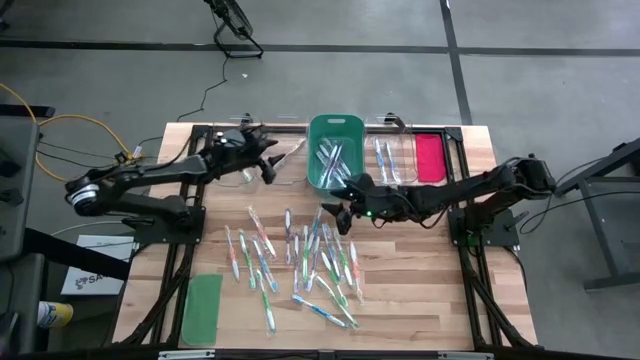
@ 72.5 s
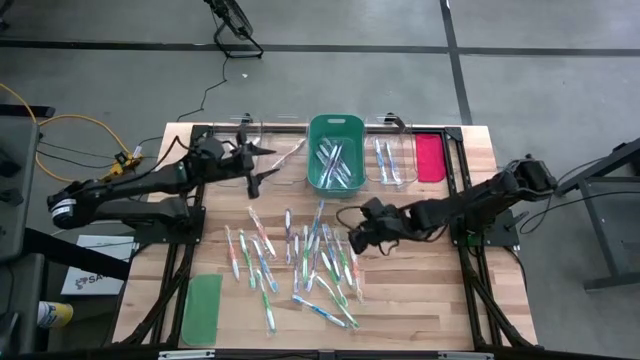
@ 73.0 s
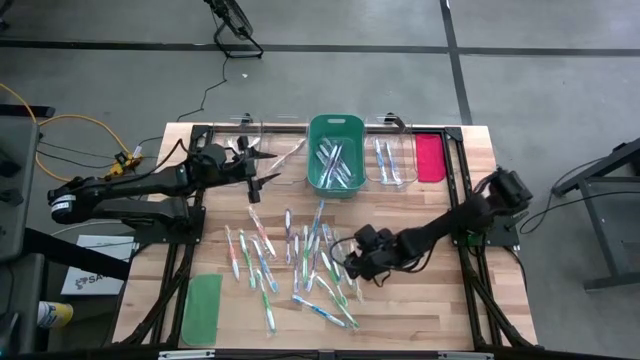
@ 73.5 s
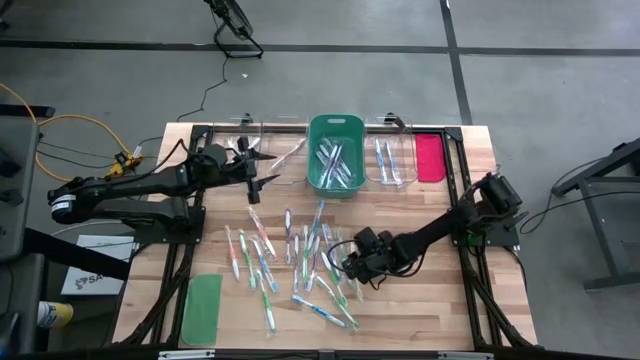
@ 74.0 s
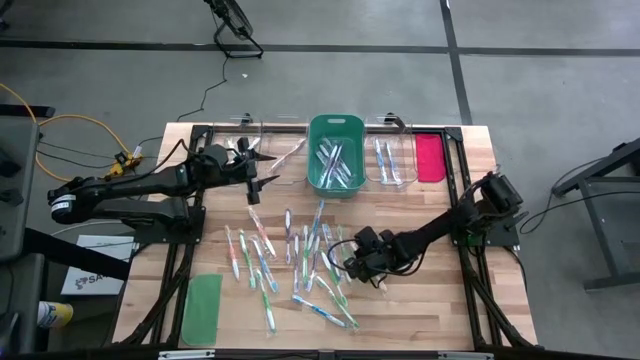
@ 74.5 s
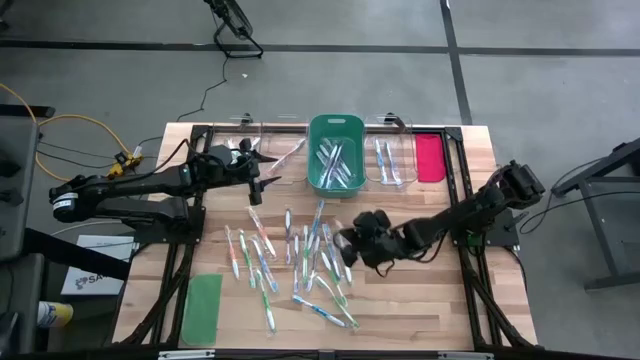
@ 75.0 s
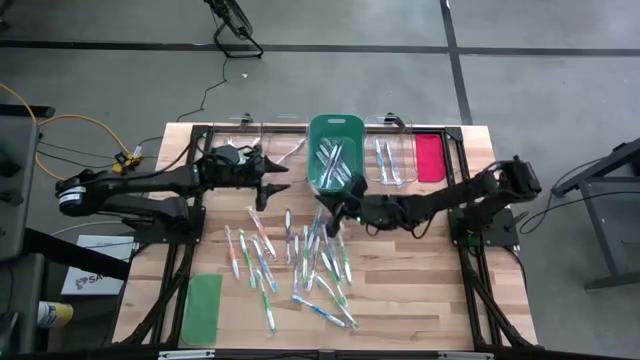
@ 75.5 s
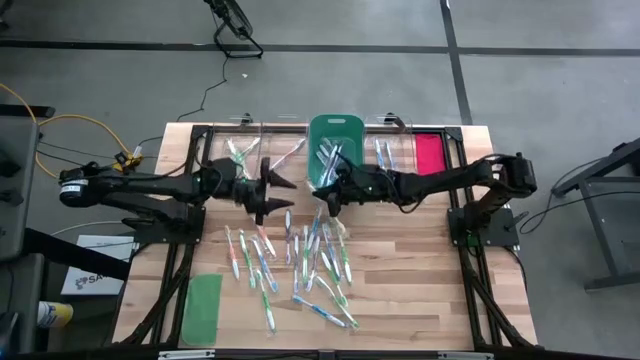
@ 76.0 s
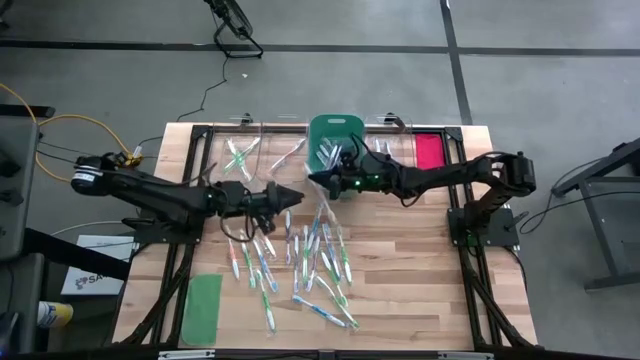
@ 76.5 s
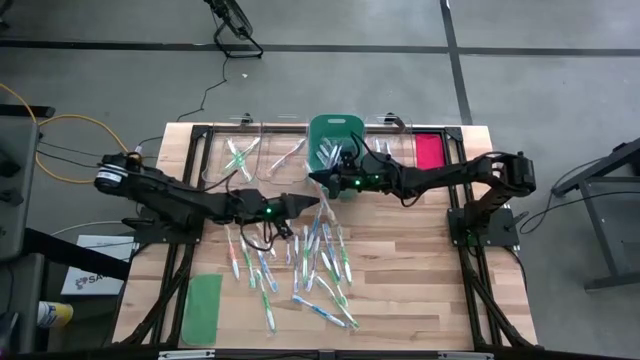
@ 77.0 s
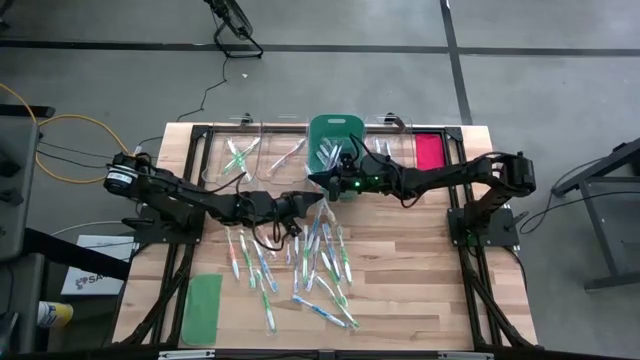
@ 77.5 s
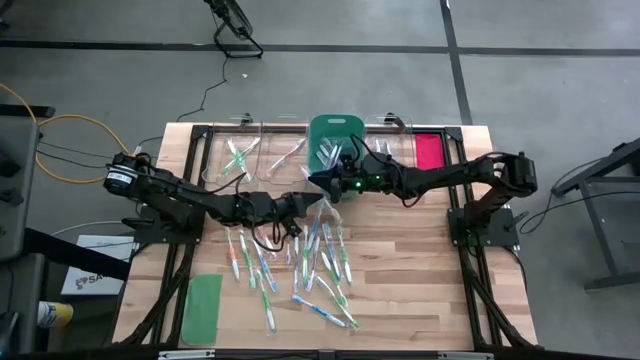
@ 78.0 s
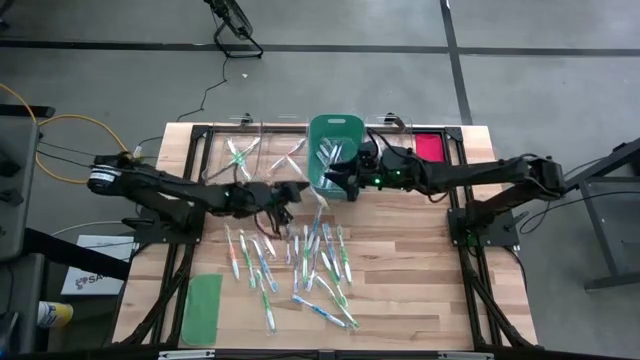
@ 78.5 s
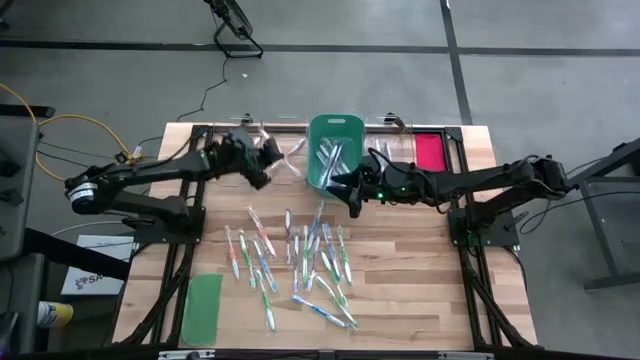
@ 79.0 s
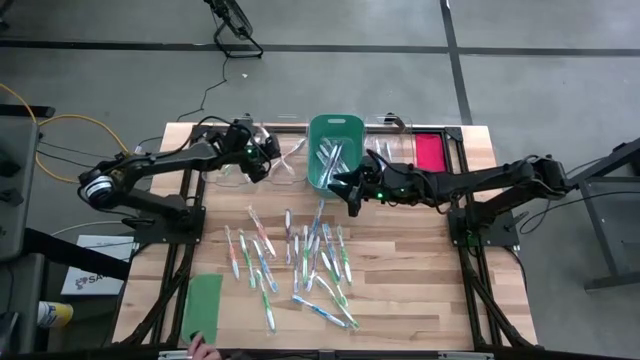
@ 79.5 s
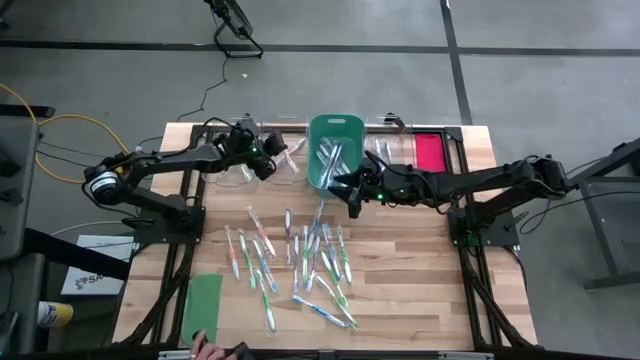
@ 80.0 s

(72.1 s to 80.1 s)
Task: Pick & Place Toothbrushes
Put the orange toothbrush into the middle transparent bin

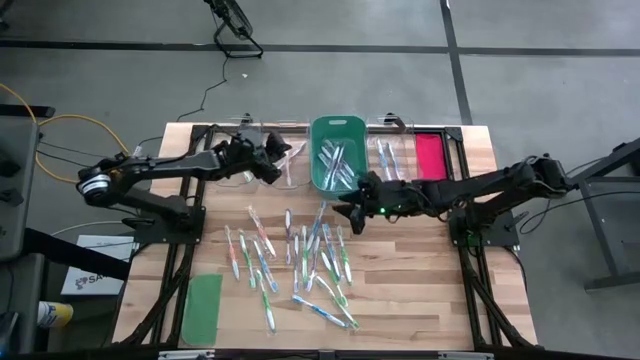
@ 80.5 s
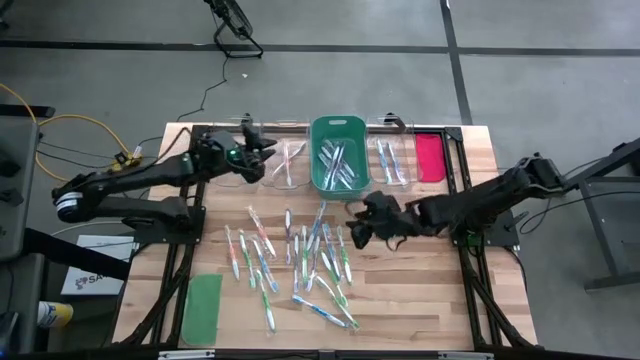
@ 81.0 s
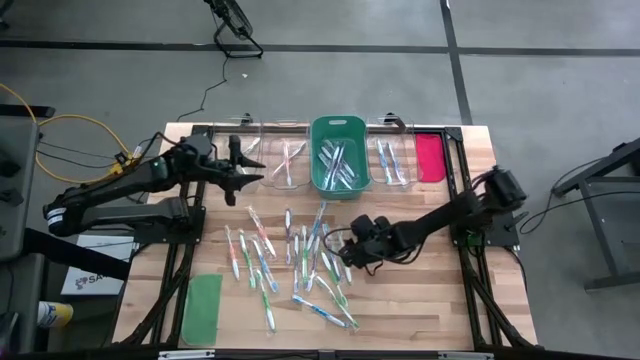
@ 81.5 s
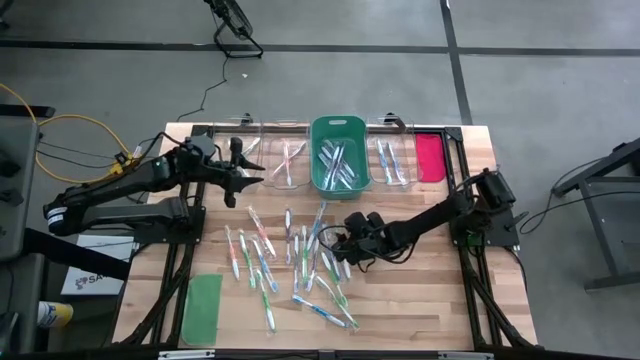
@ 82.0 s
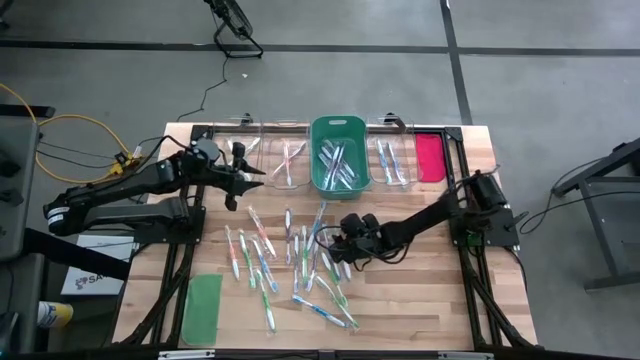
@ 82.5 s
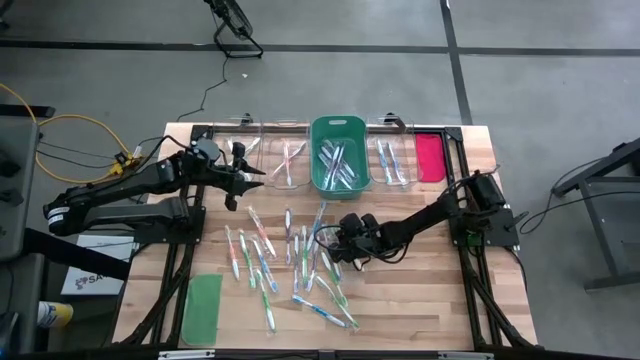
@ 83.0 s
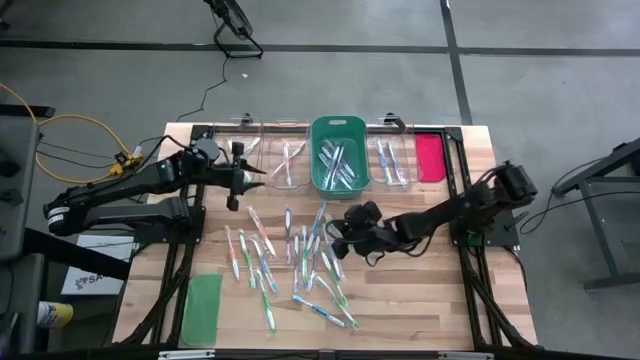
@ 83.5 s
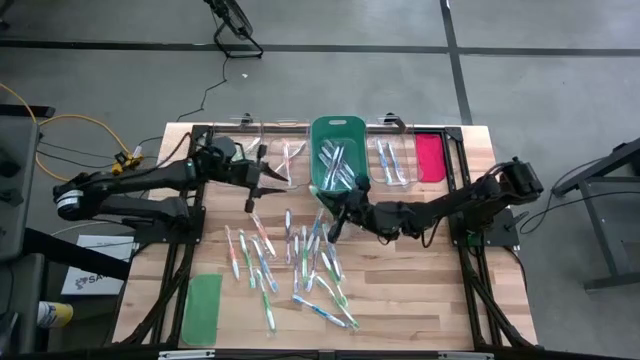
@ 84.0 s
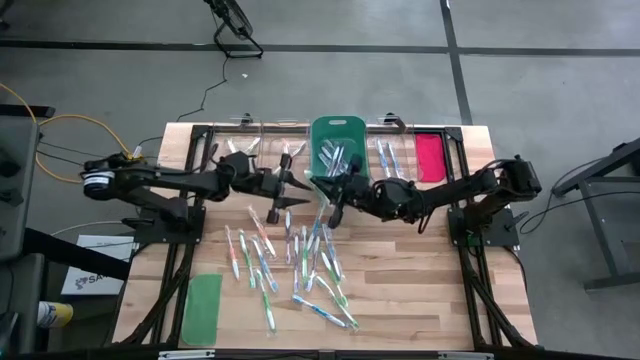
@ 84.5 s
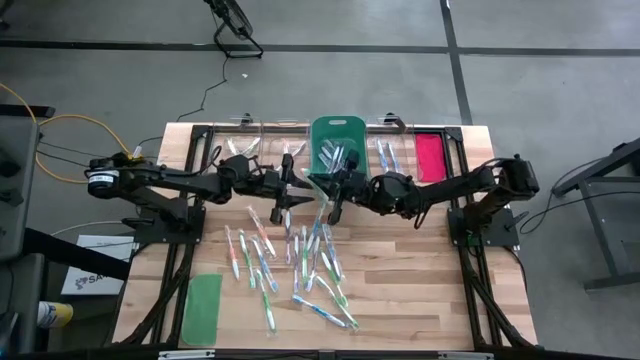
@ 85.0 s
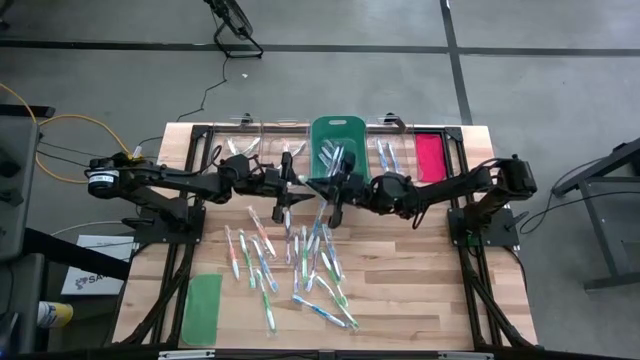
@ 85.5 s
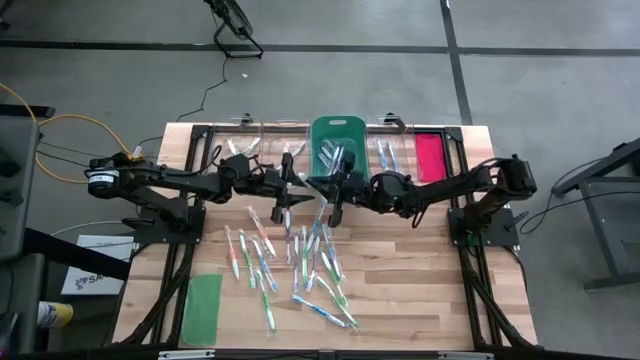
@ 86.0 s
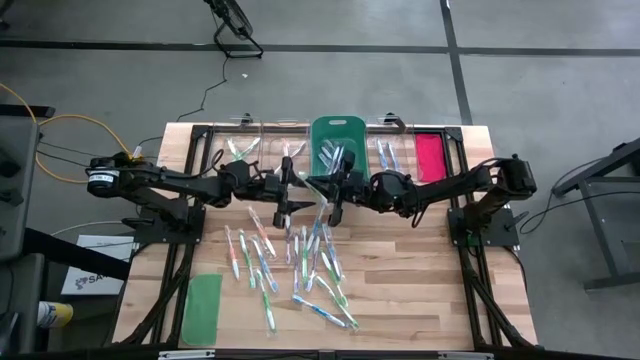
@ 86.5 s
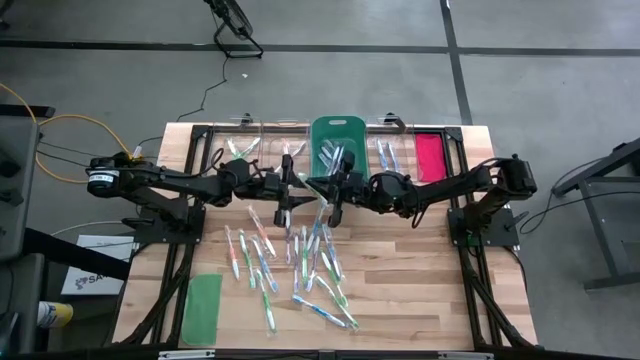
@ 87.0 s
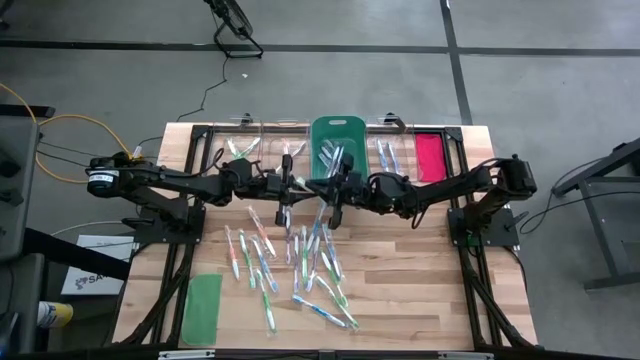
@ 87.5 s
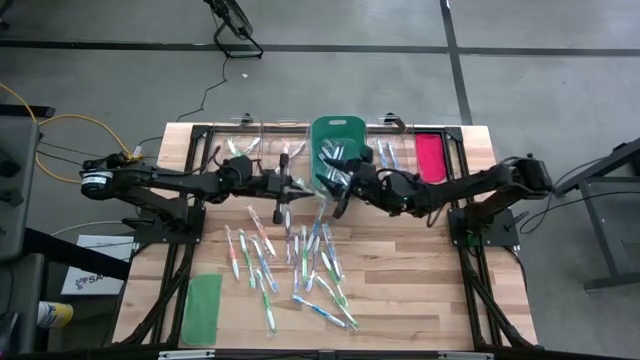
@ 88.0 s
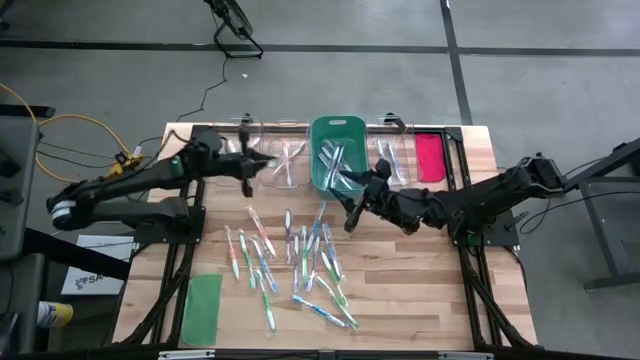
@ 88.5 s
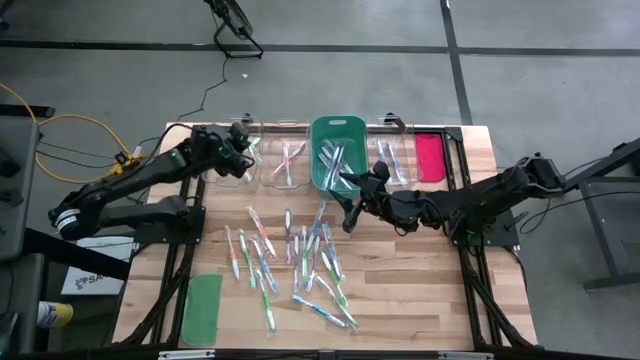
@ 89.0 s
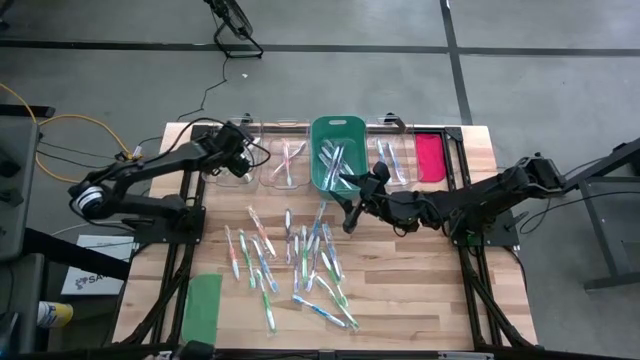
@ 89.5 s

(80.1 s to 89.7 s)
Put the green toothbrush into the left transparent bin

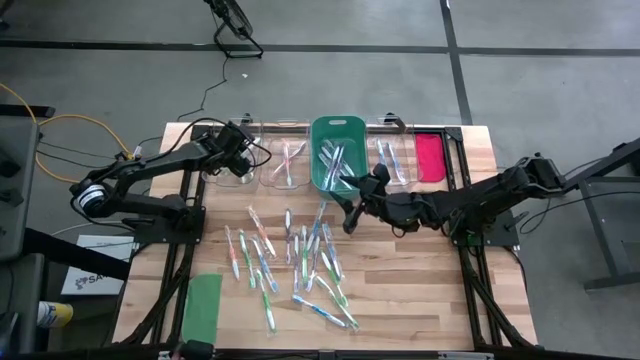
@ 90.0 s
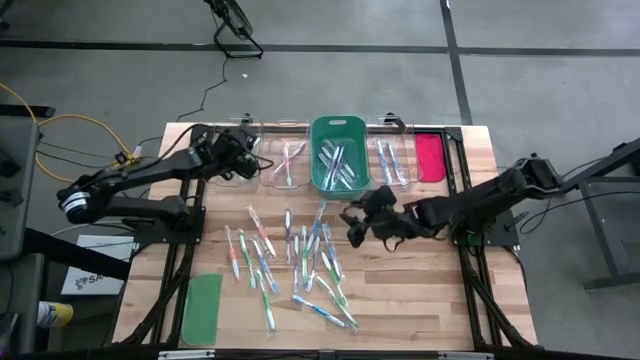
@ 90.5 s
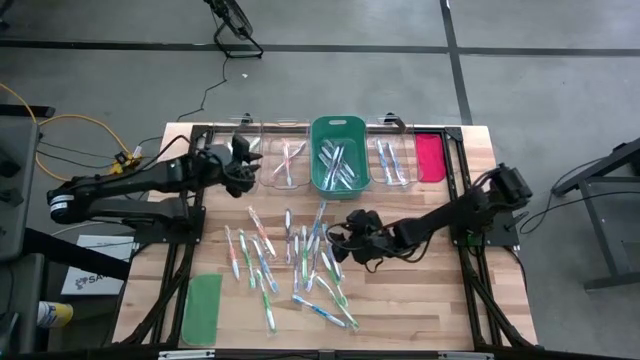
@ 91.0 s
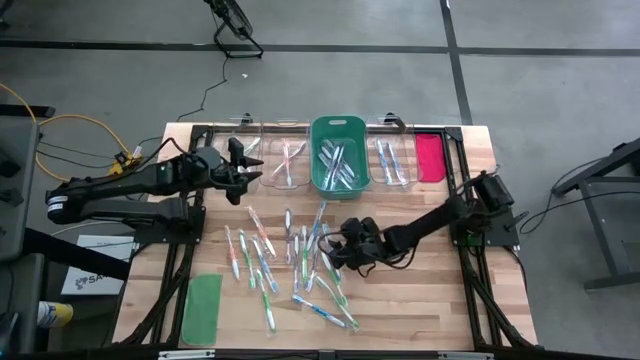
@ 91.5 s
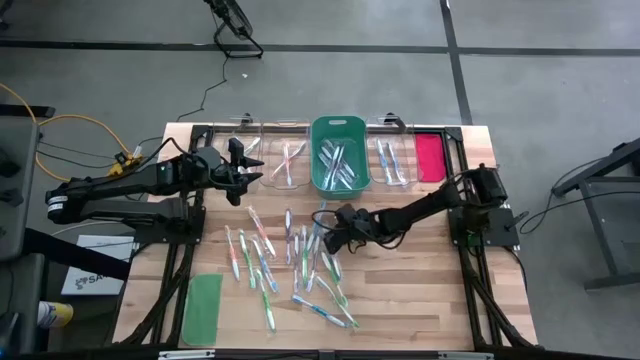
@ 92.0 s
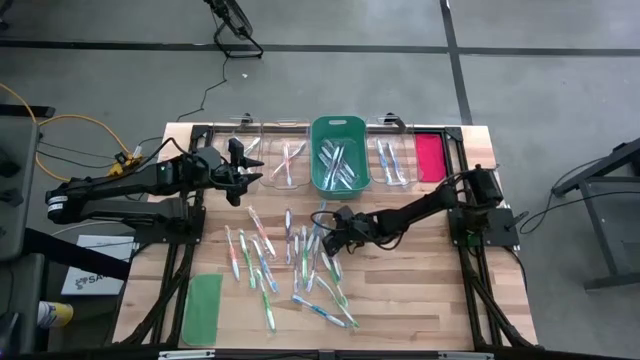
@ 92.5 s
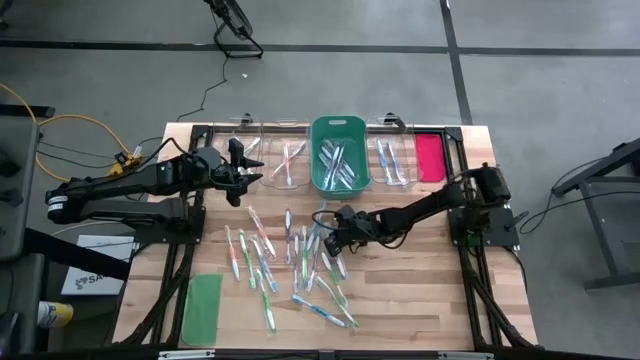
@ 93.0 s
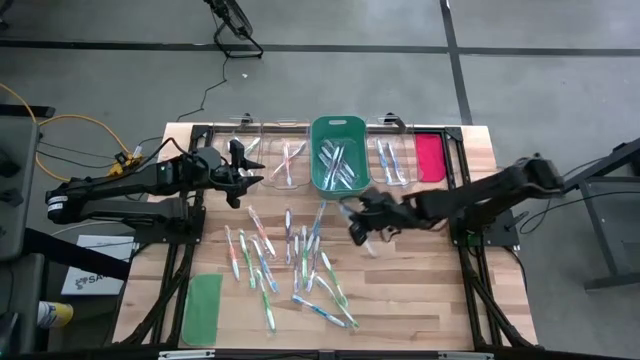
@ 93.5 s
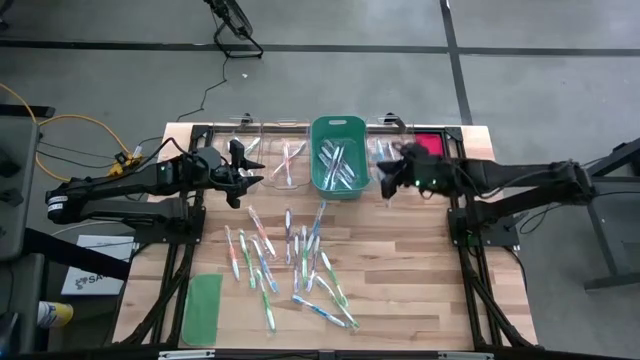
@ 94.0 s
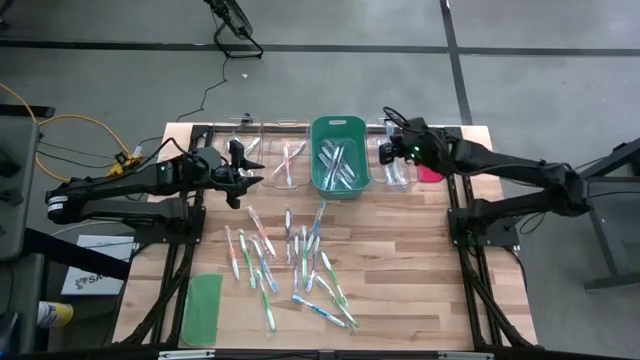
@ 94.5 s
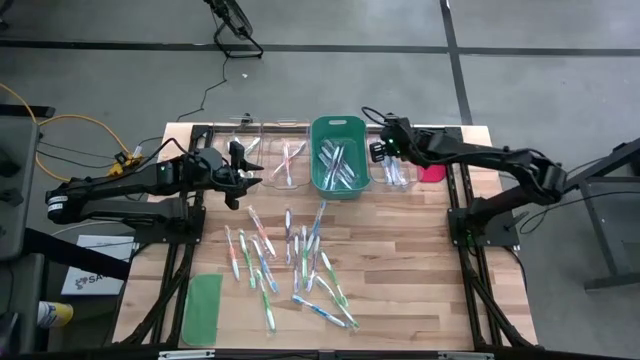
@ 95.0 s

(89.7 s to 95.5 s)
Put the blue toothbrush into the right transparent bin
